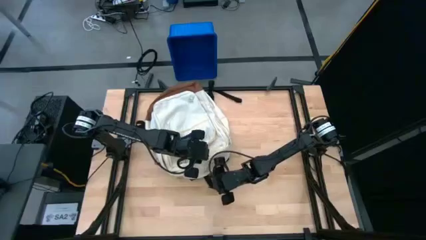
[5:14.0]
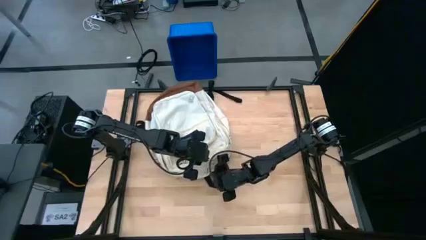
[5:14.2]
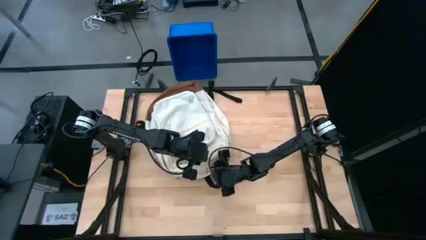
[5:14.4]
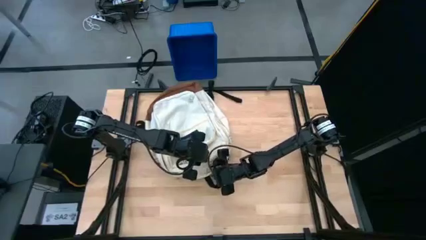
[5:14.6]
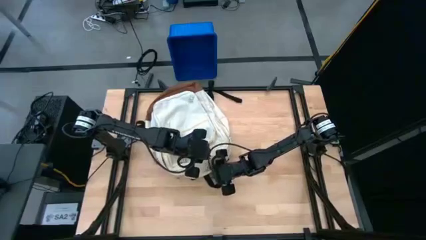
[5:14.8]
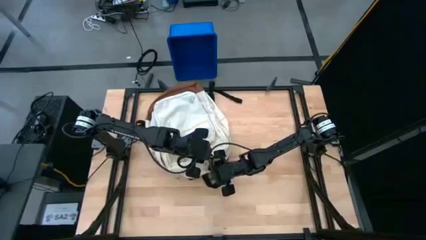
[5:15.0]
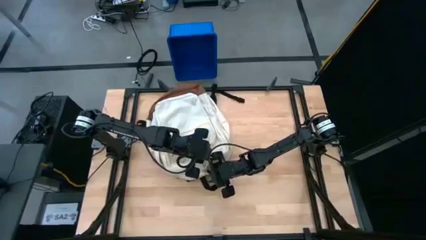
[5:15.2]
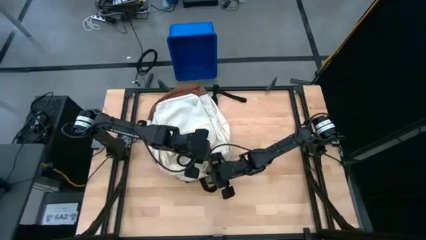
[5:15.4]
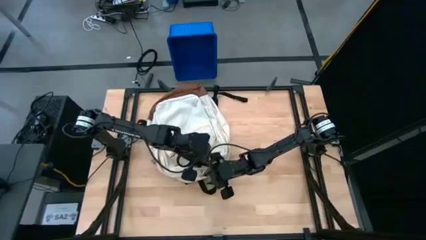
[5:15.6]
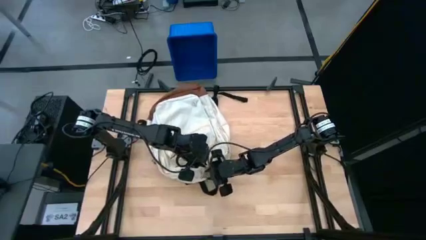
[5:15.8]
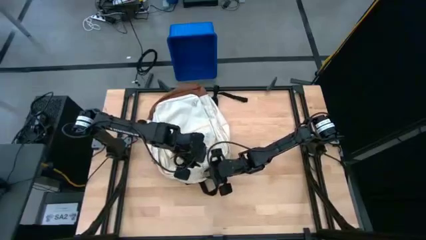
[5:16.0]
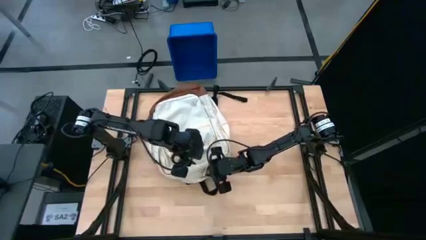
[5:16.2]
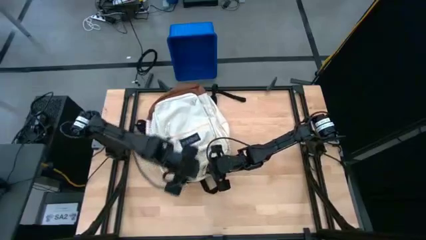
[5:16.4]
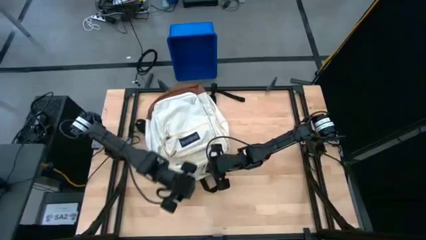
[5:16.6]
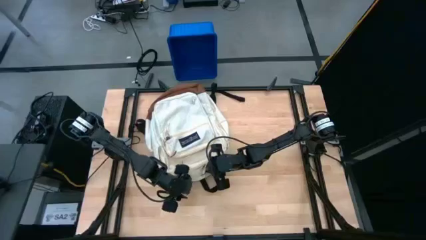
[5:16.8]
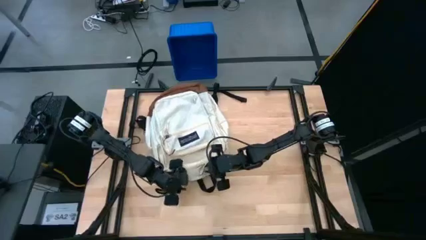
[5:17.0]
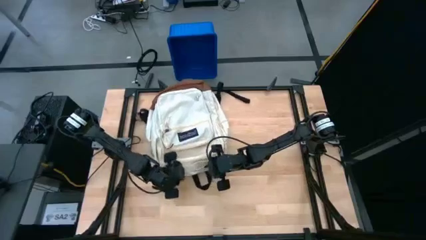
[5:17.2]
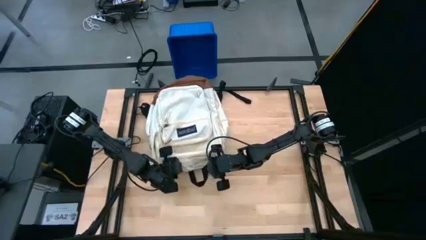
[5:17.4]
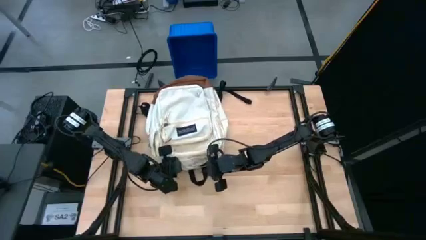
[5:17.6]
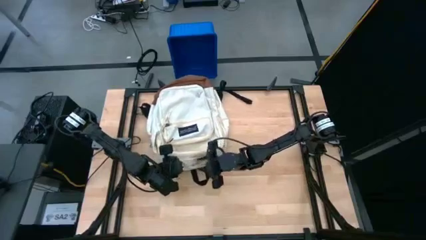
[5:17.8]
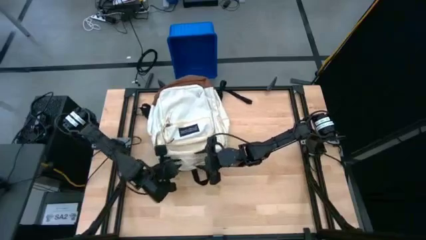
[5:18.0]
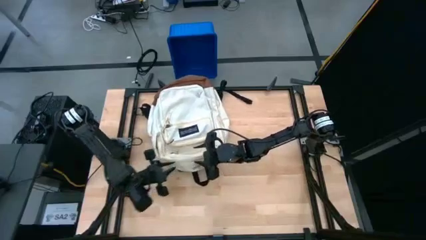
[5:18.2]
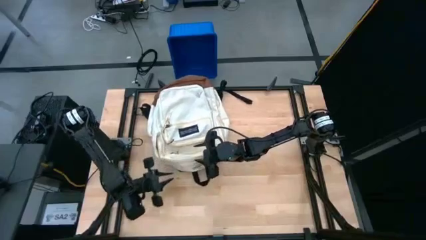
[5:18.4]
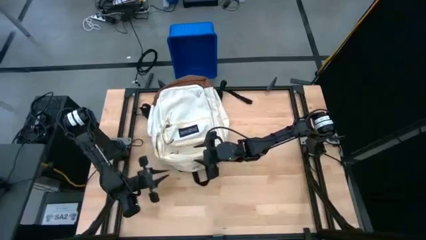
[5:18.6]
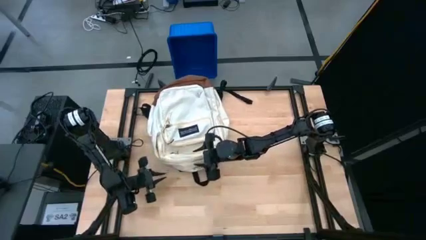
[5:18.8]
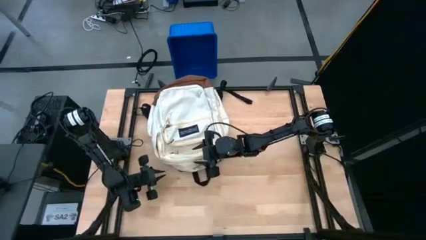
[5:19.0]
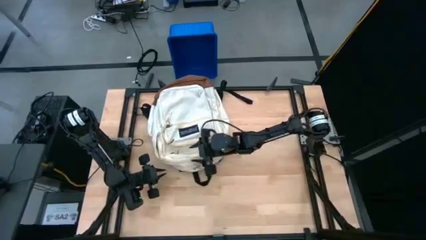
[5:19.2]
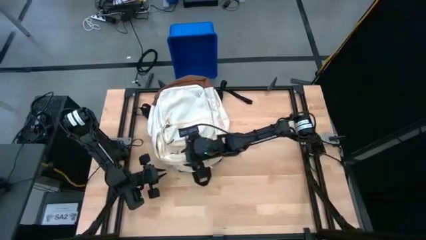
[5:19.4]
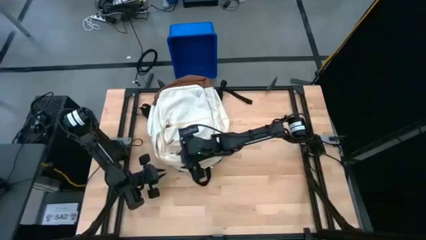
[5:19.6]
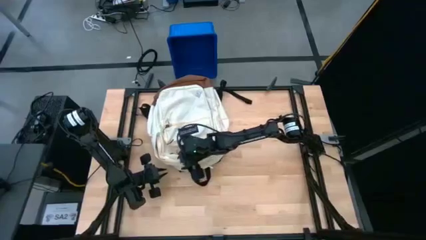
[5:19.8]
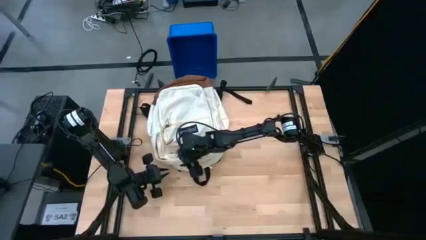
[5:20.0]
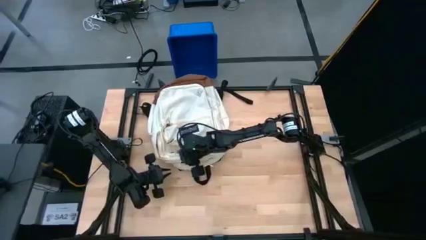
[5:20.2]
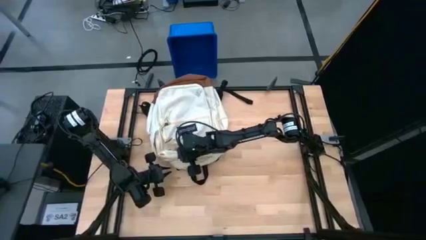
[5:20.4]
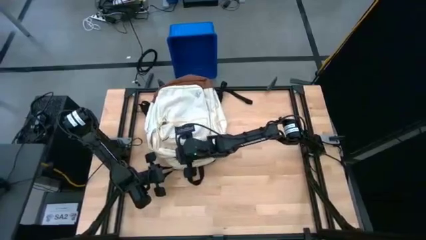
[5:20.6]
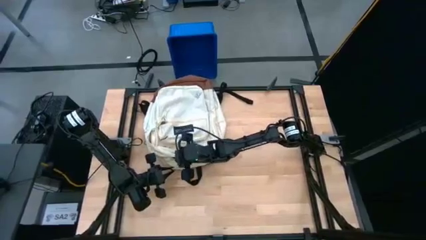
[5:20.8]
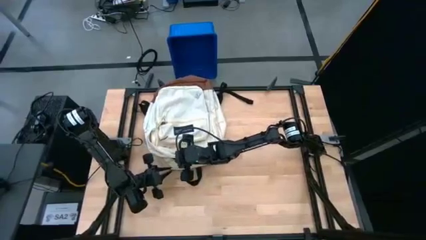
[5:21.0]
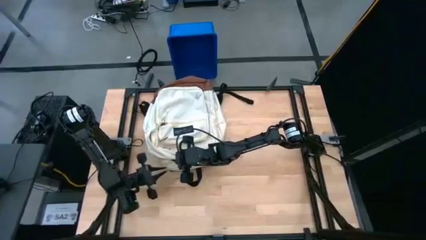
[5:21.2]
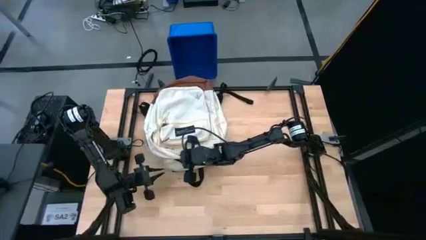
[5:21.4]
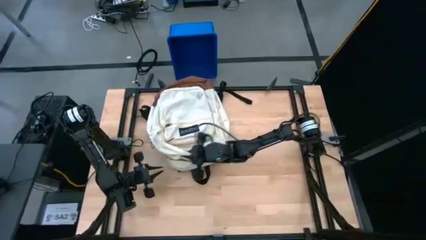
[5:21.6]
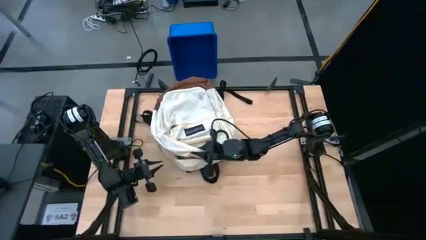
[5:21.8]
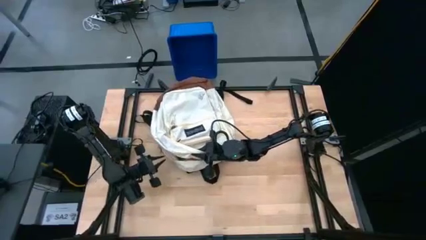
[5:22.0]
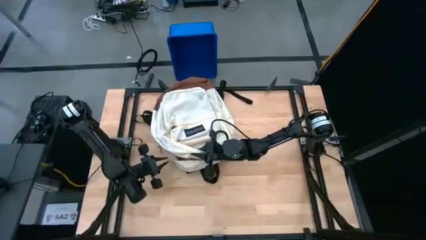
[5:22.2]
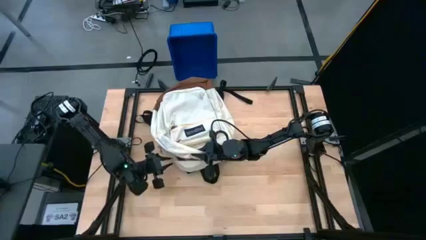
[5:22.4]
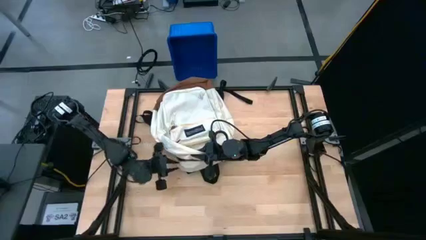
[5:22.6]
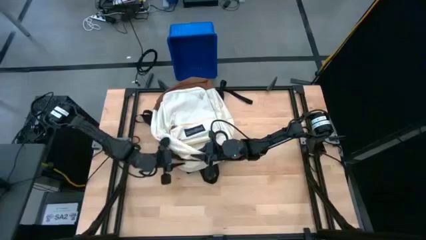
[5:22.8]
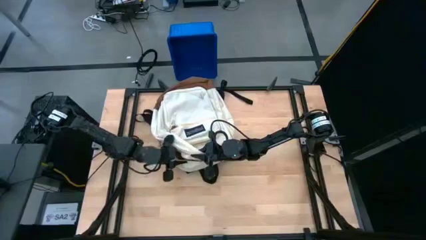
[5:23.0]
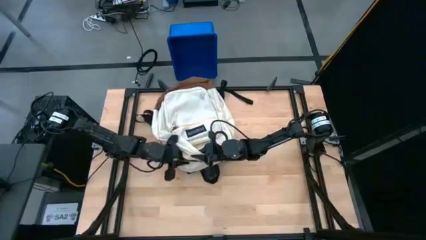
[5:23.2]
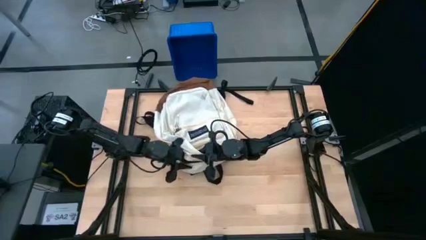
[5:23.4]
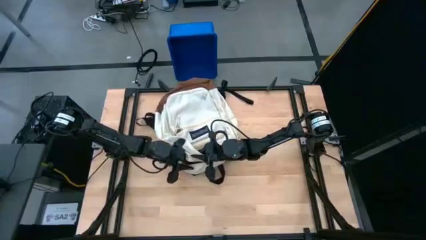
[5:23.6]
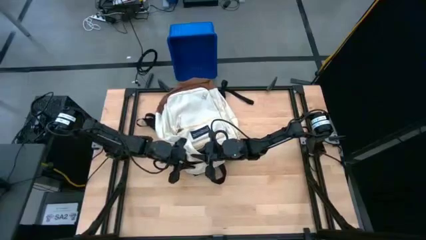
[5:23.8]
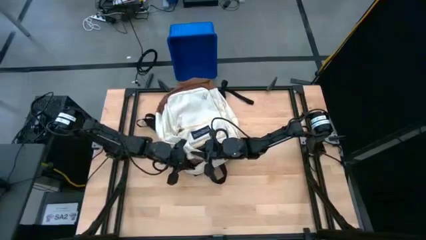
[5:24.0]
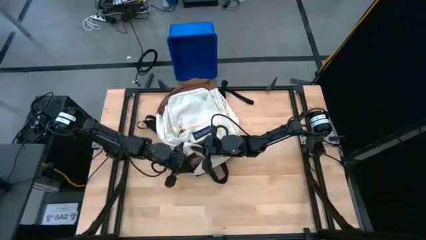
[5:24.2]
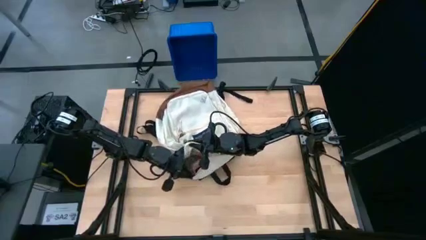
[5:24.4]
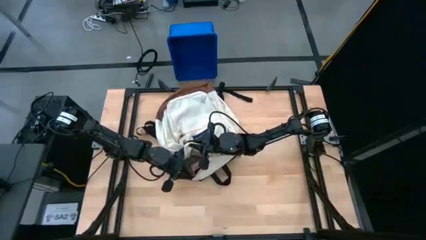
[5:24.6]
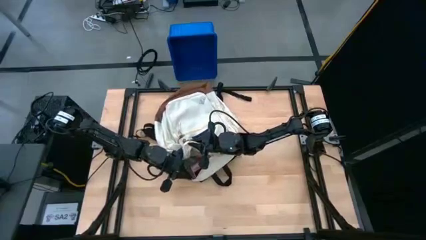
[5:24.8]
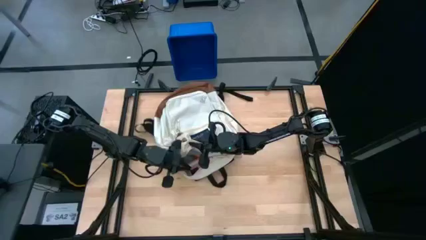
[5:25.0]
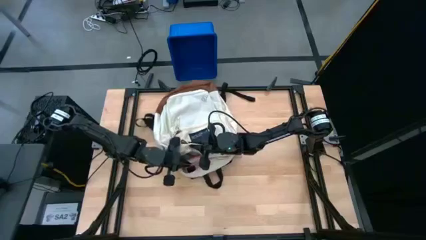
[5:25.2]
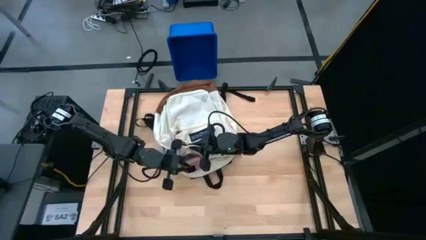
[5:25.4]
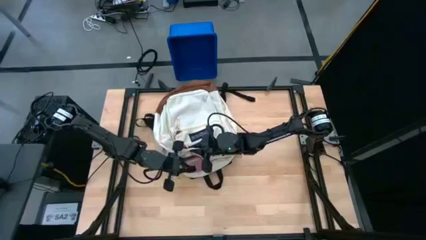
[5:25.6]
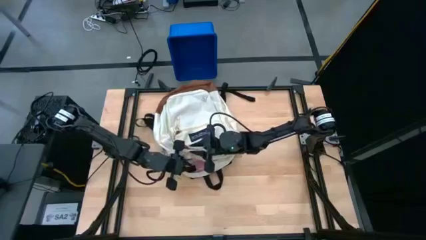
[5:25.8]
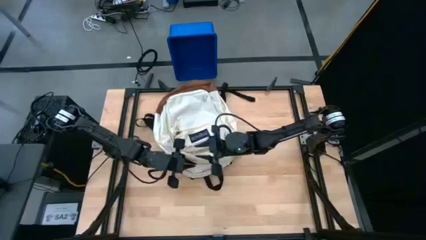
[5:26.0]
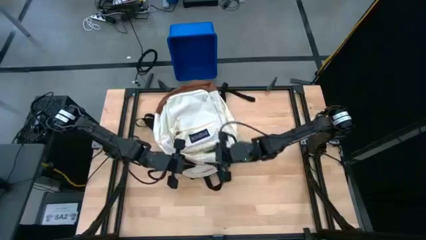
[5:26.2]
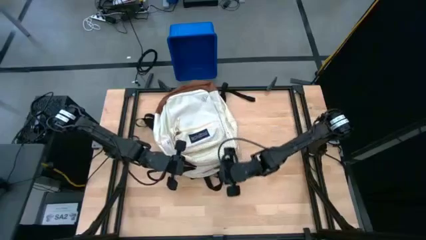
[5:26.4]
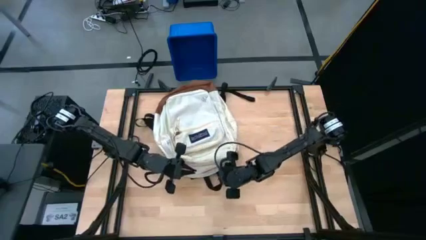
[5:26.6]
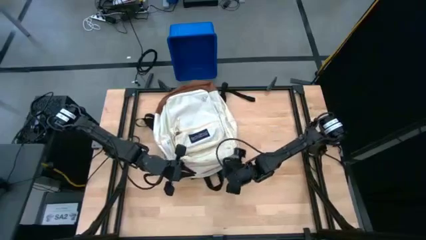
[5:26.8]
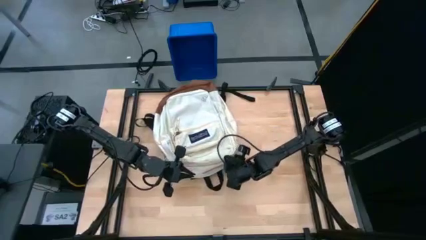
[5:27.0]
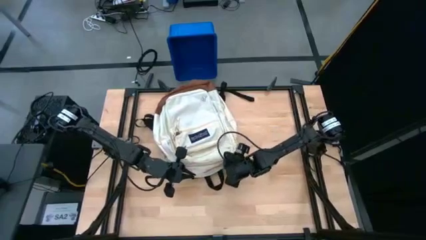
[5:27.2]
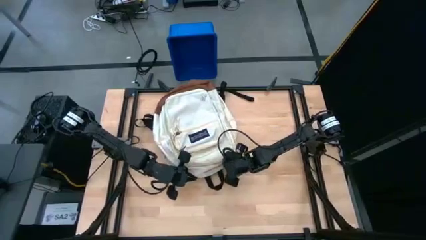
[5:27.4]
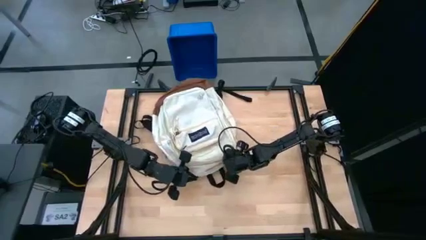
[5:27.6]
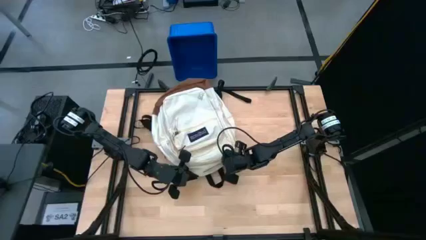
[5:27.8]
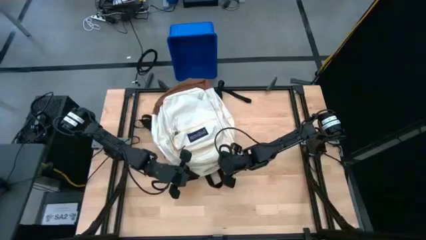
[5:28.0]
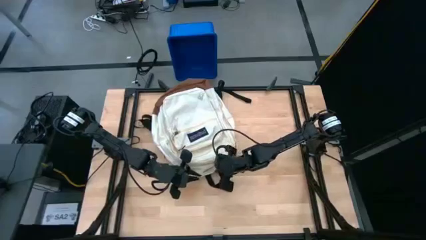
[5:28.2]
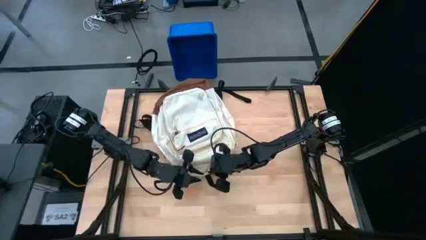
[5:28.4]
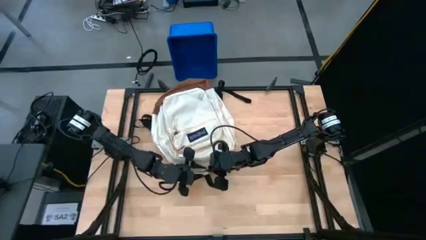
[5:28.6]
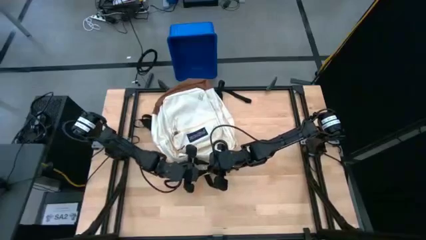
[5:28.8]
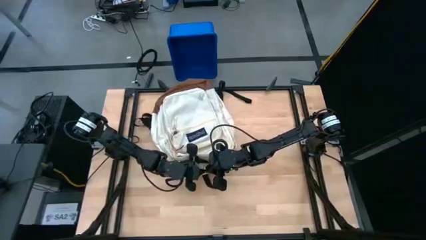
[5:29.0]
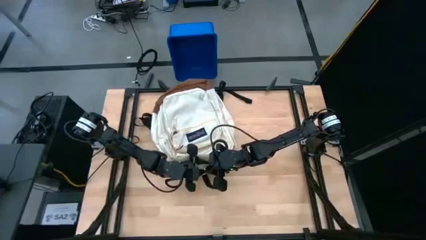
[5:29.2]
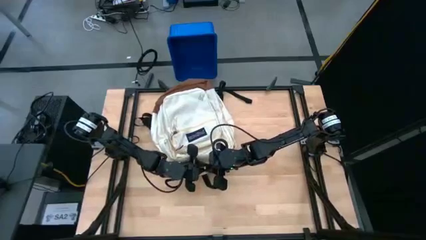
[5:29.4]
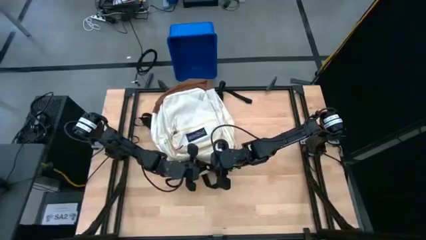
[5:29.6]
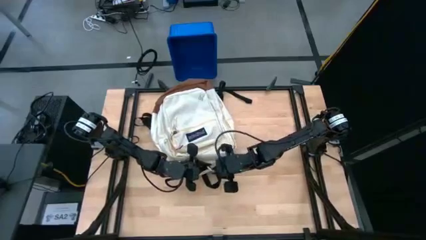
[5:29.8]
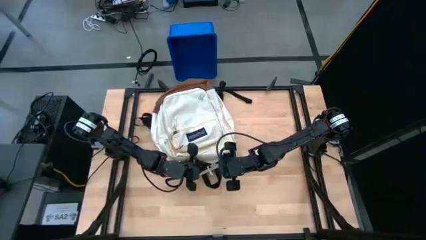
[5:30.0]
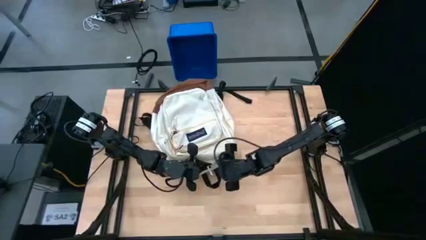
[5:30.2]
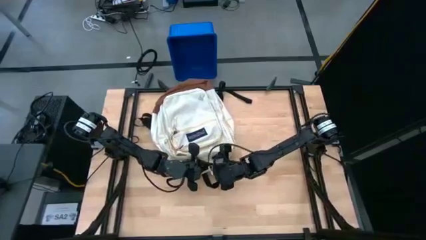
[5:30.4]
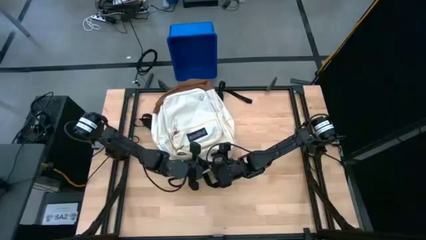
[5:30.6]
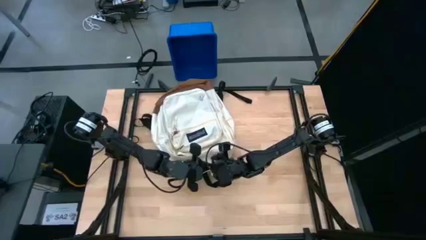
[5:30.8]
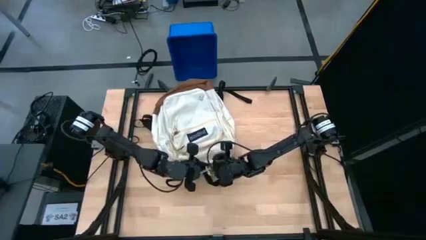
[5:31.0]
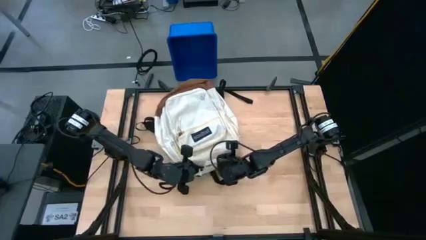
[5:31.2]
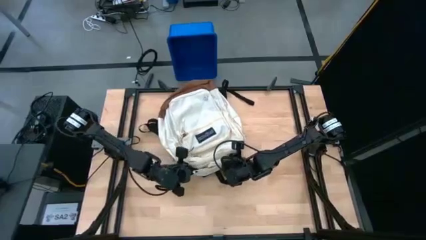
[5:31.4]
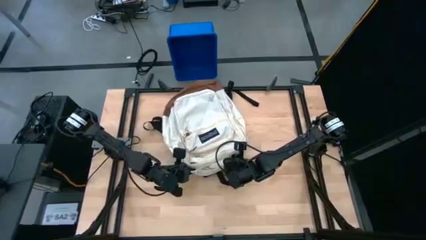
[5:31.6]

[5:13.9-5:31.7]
Task: Unpack backpack
Close the white backpack
